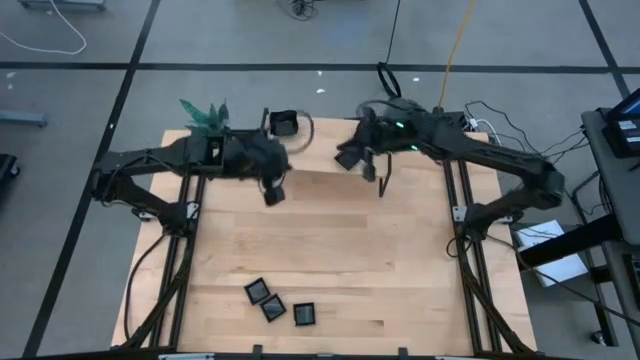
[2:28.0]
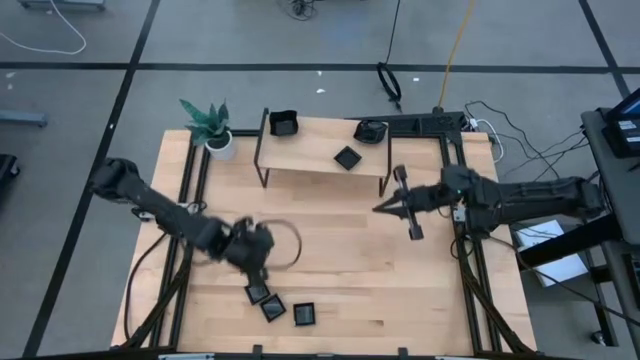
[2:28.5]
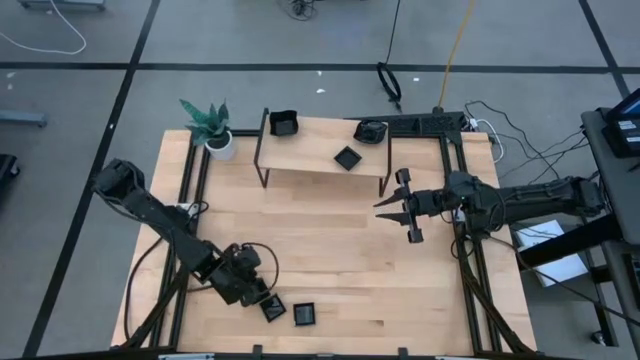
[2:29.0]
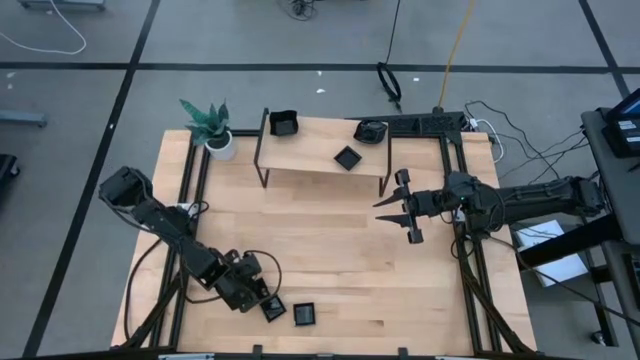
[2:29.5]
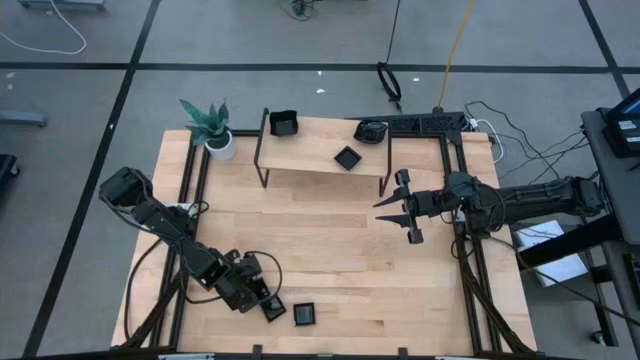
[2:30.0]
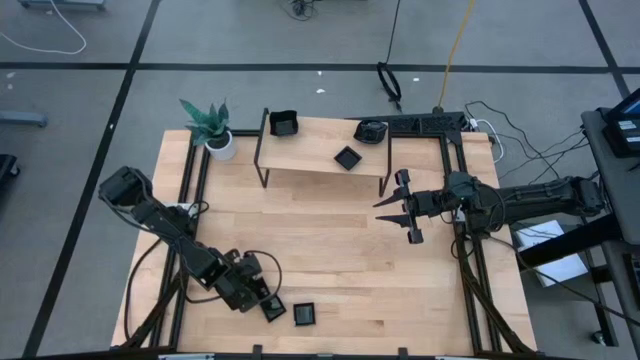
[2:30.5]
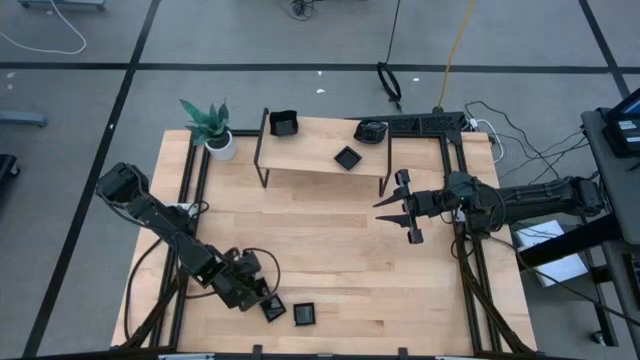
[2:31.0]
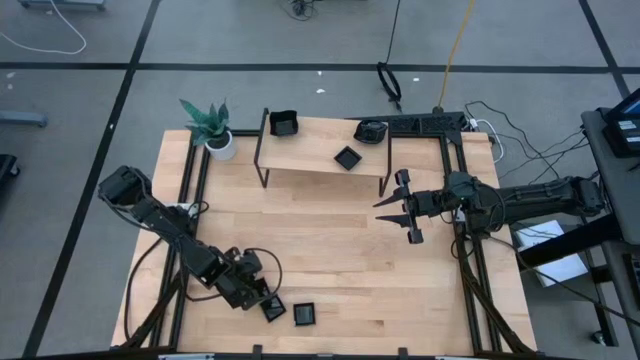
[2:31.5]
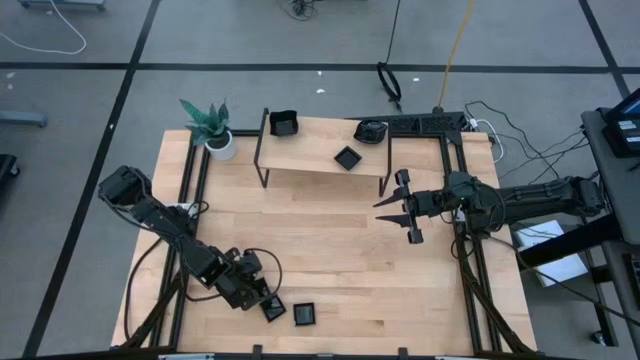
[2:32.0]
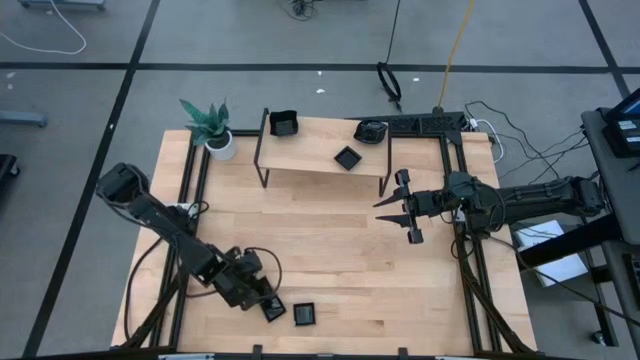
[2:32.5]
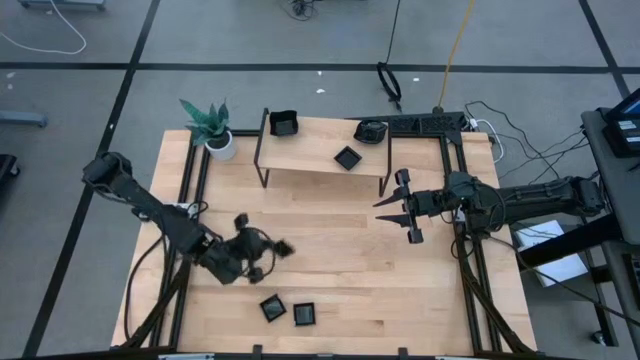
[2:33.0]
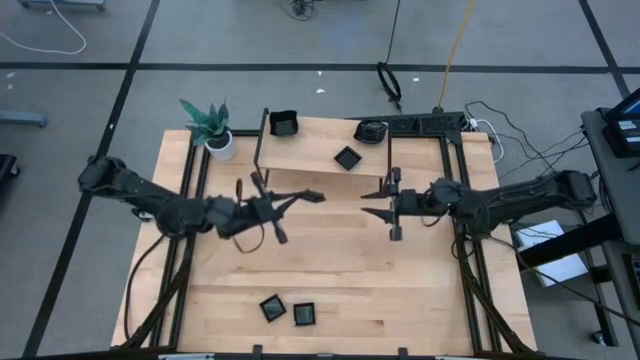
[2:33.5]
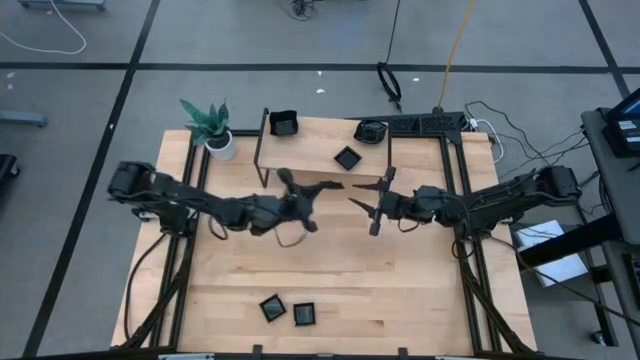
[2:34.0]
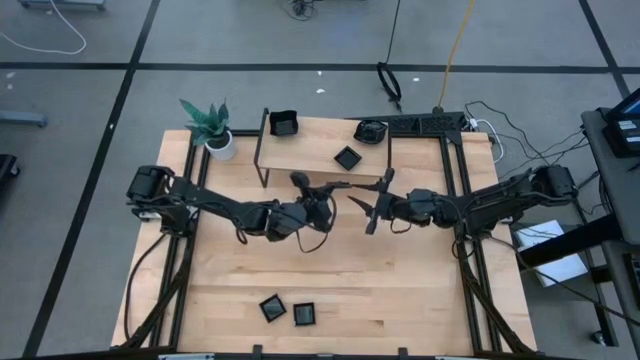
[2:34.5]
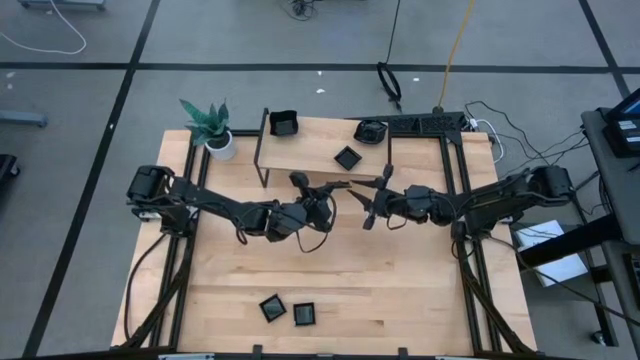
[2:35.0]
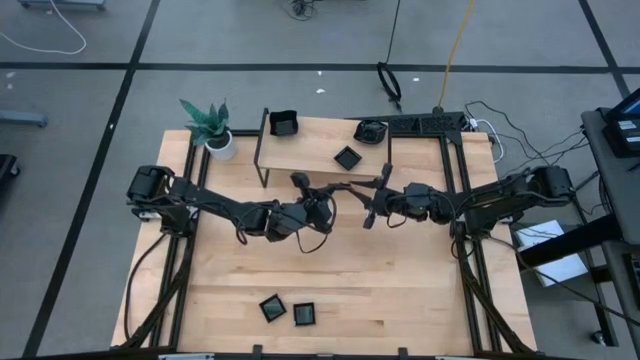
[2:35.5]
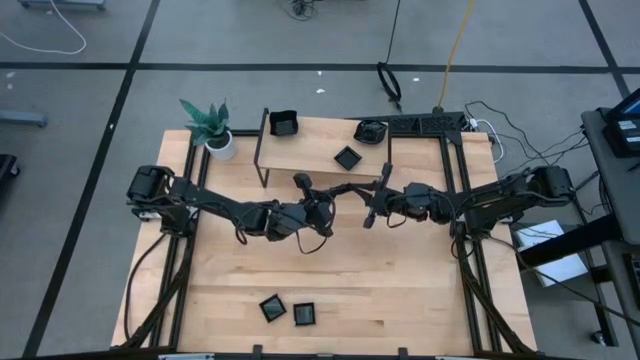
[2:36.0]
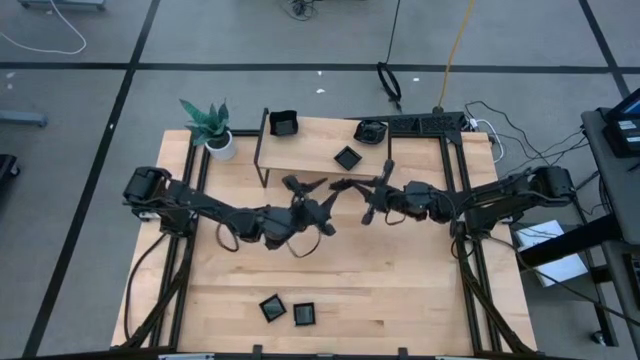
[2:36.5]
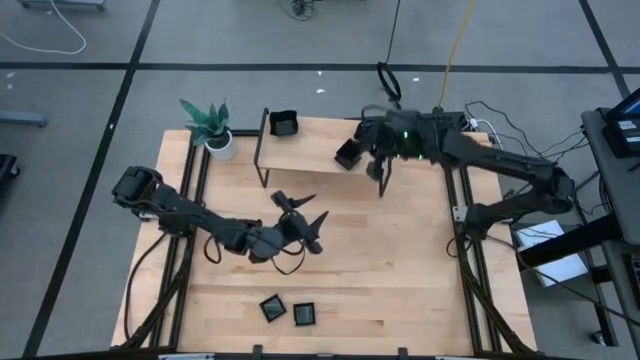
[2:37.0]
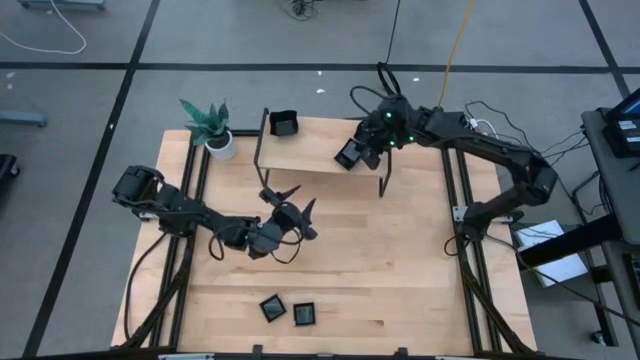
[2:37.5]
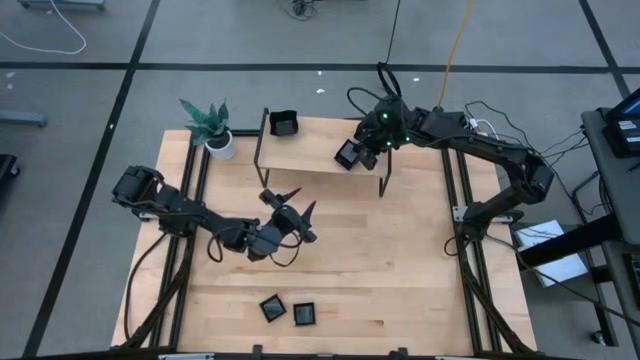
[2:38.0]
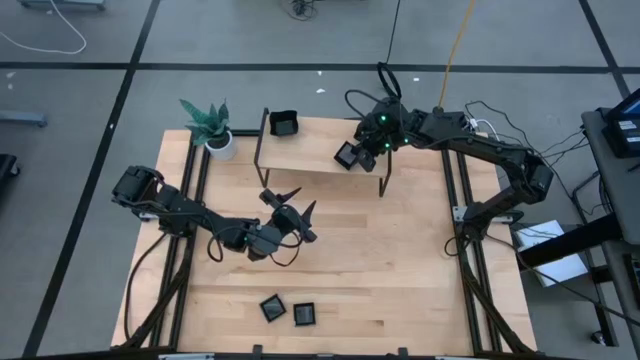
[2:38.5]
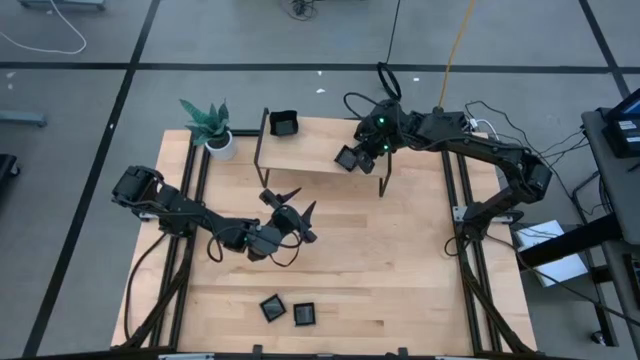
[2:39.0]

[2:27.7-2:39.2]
Task: Pick & Place Mini shaped plates
Stack the black square plate on top of the other black square plates on the shelf

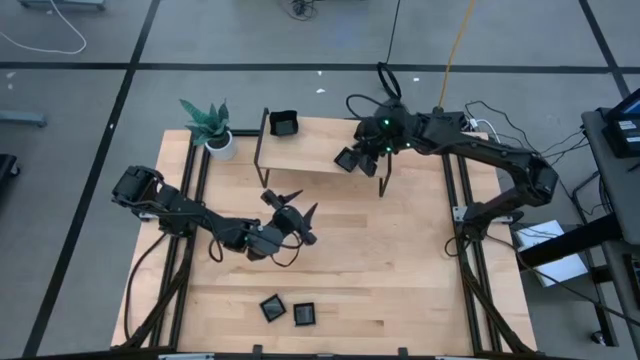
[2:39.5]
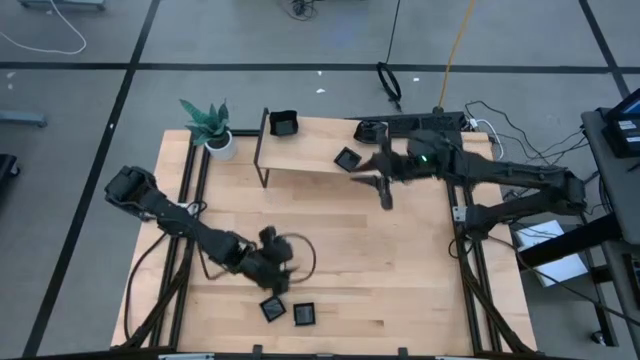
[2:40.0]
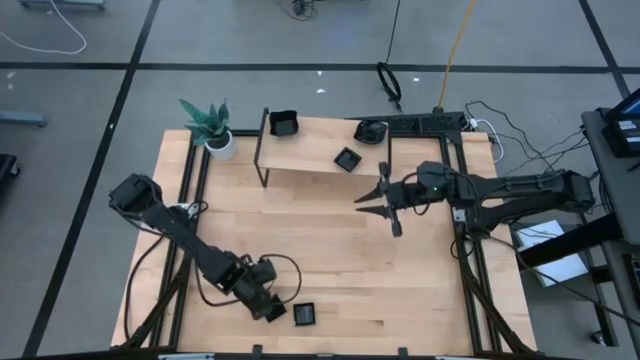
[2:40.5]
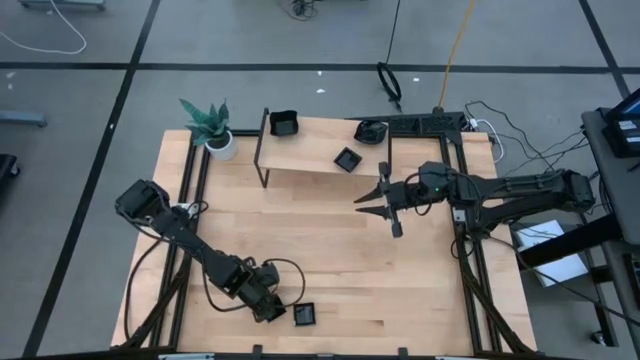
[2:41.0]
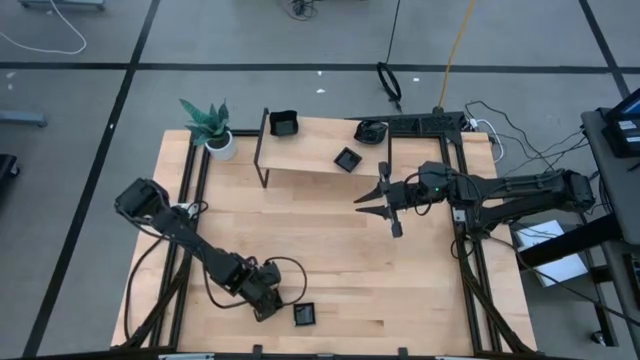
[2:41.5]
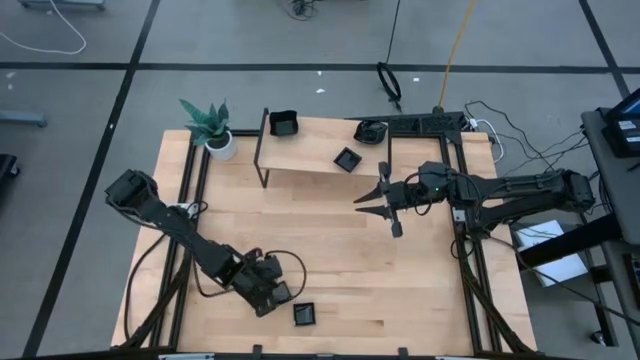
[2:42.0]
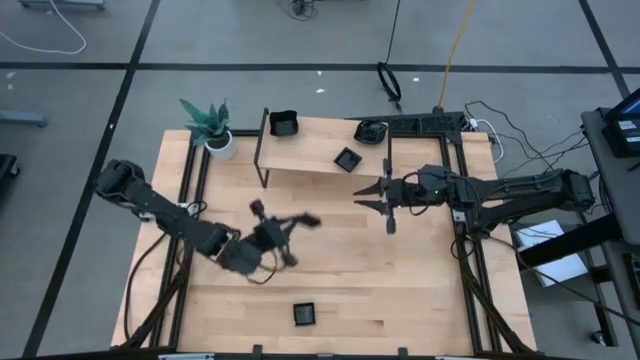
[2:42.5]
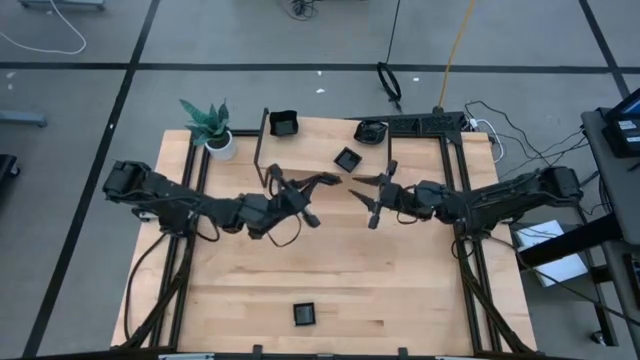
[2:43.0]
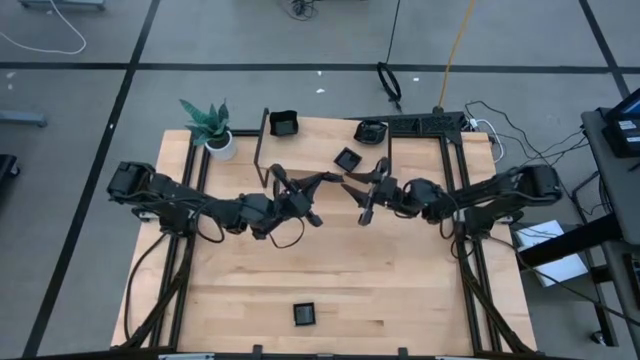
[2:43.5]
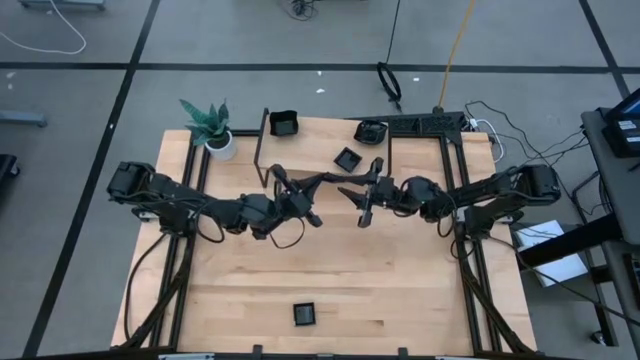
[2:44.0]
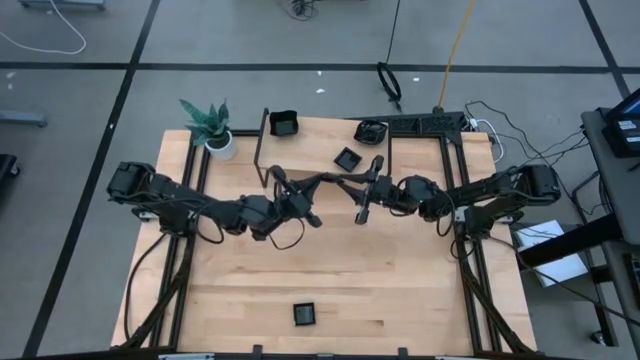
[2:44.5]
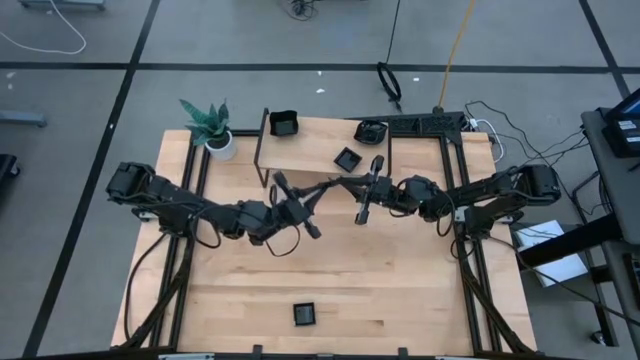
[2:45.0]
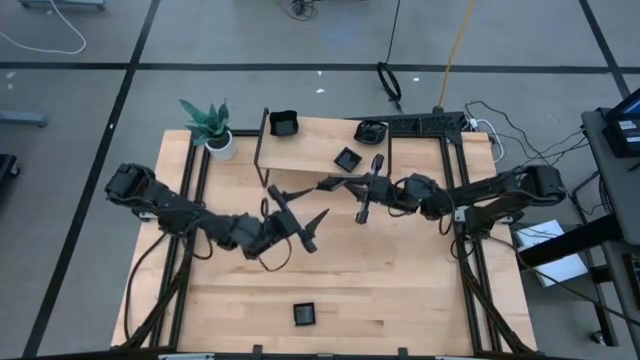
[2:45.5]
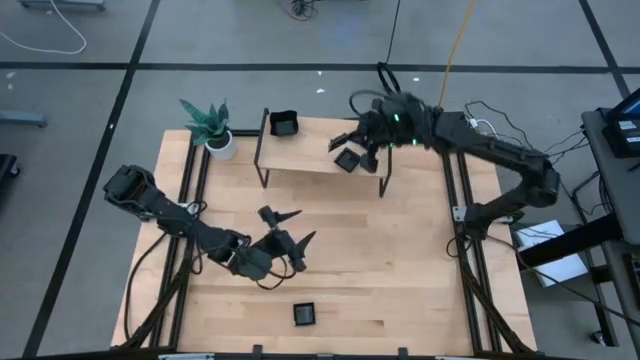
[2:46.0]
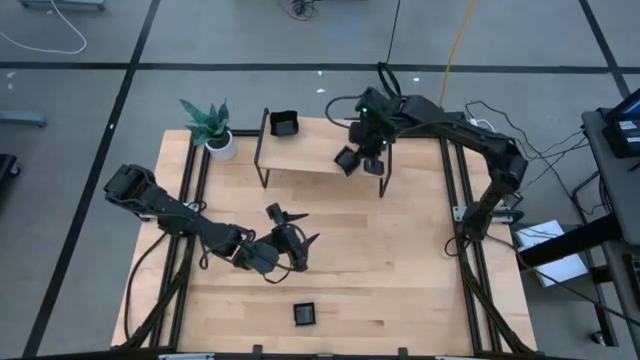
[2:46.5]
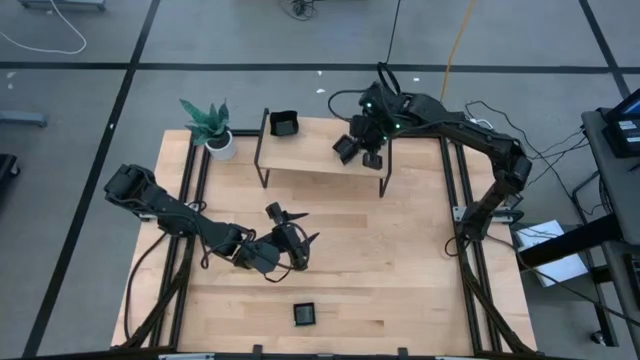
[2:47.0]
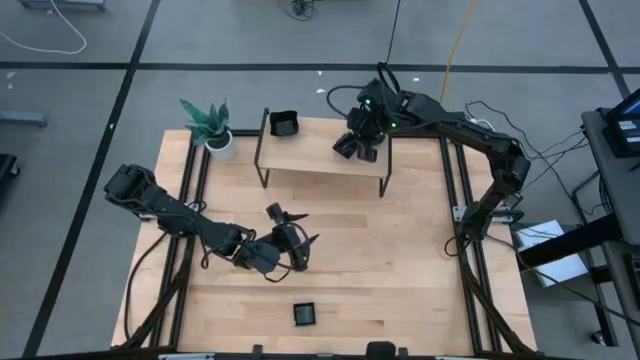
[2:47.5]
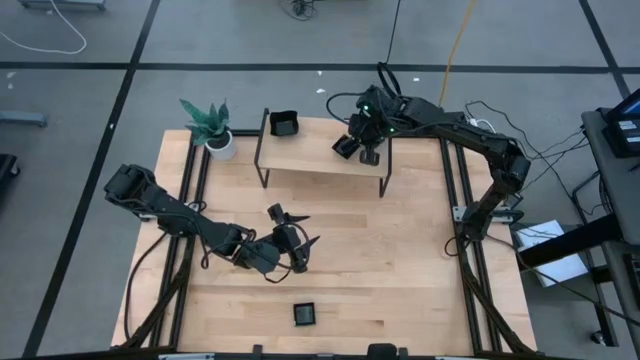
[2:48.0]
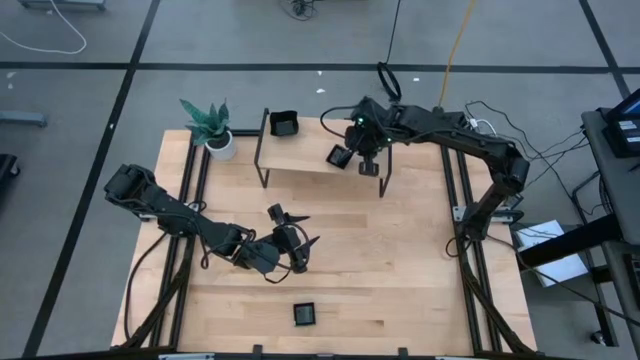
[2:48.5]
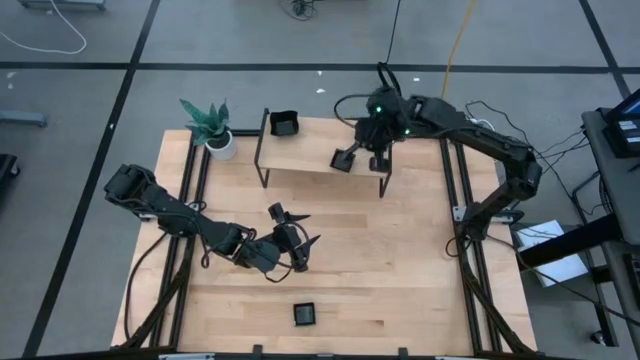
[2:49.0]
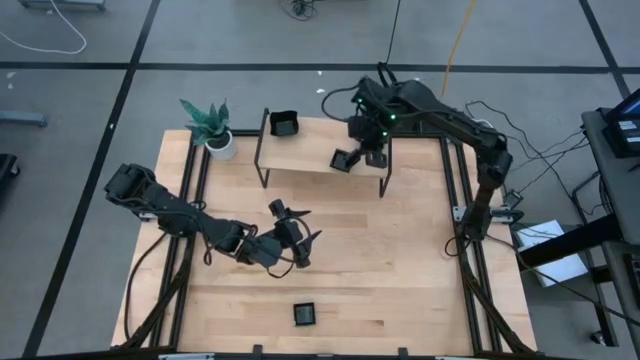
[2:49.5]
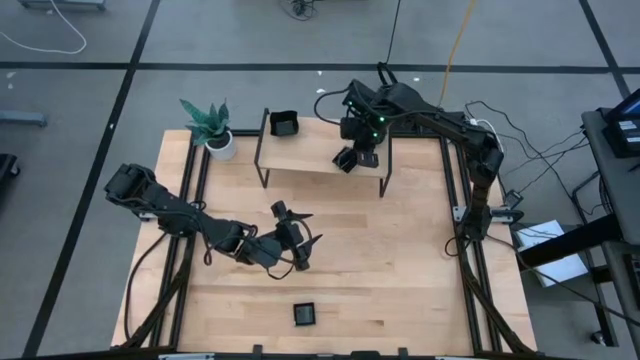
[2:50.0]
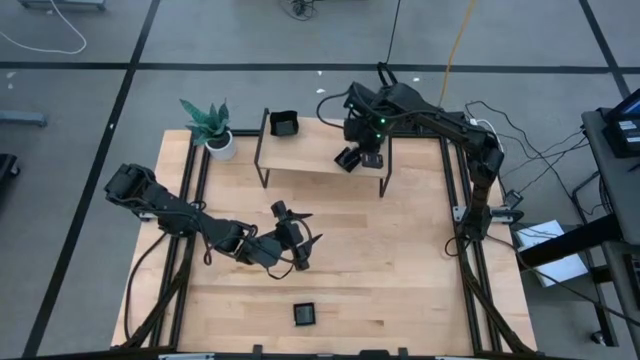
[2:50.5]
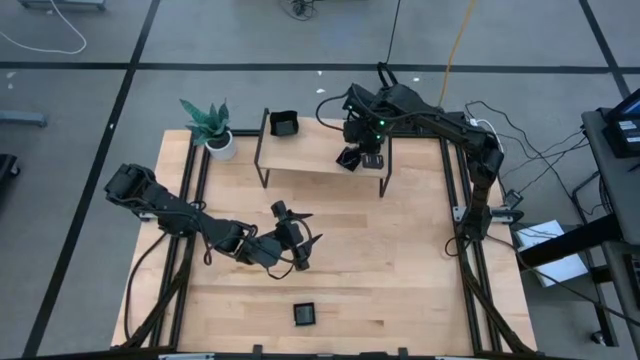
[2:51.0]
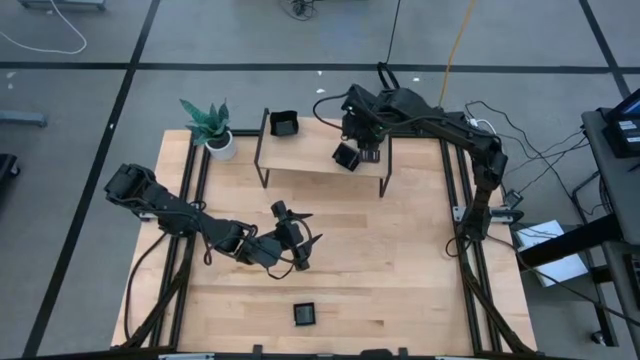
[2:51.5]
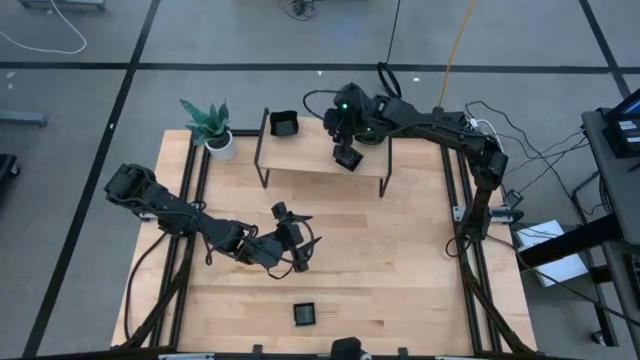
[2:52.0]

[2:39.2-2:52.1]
Stack the black square plate on top of the other black square plates on the shelf
